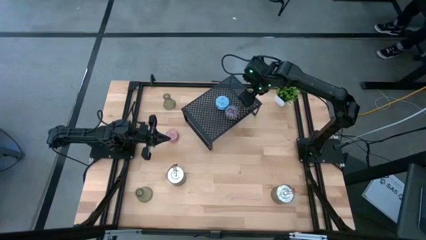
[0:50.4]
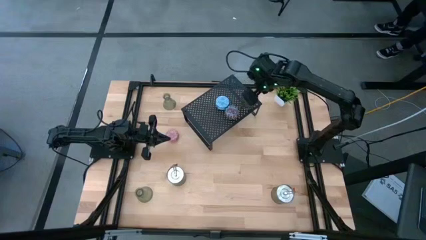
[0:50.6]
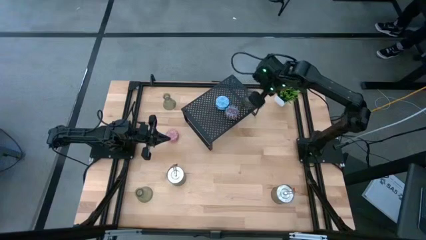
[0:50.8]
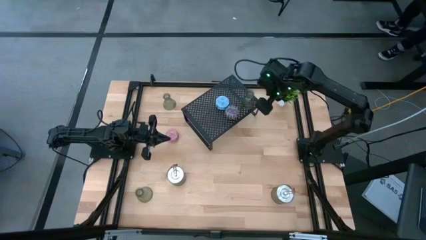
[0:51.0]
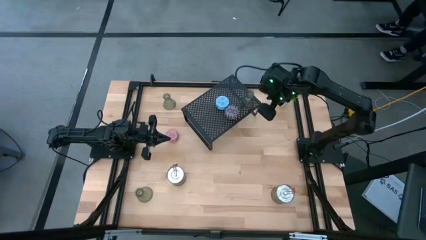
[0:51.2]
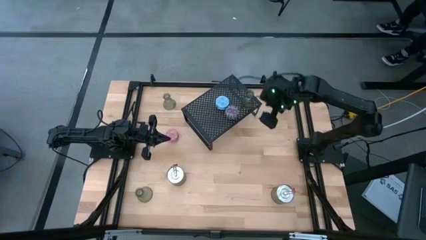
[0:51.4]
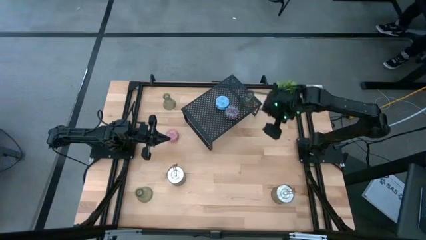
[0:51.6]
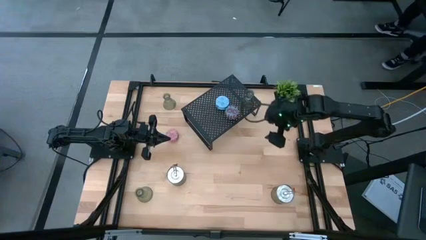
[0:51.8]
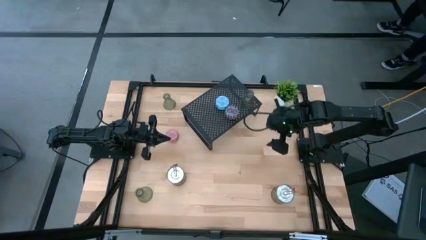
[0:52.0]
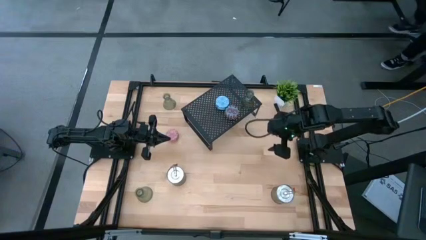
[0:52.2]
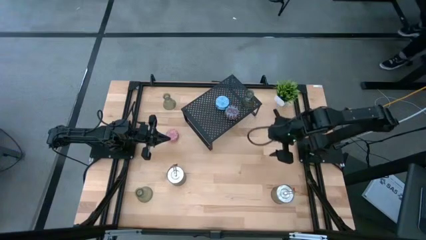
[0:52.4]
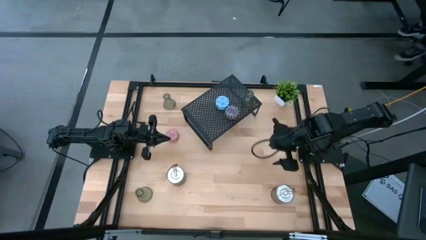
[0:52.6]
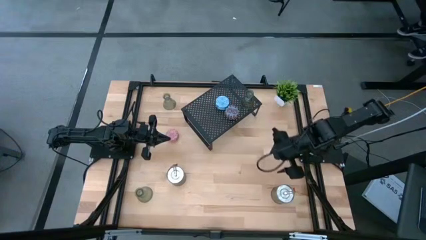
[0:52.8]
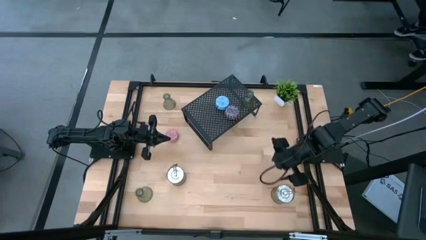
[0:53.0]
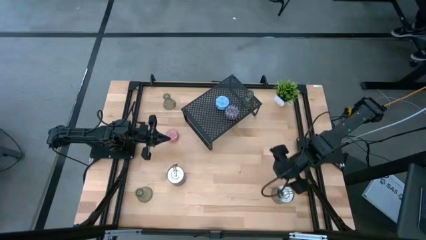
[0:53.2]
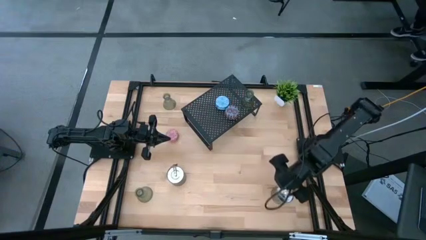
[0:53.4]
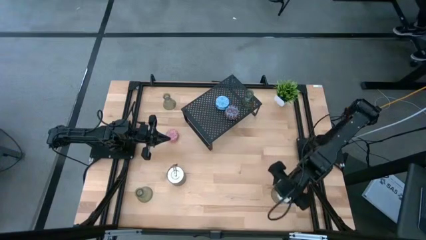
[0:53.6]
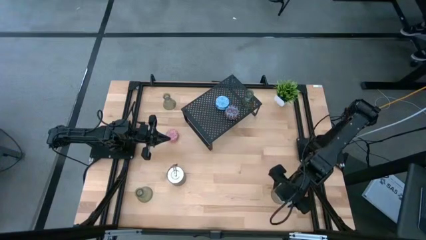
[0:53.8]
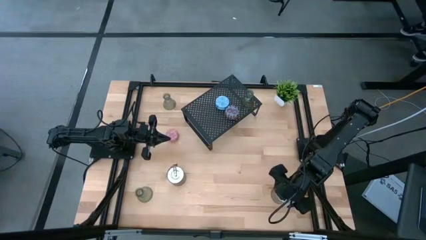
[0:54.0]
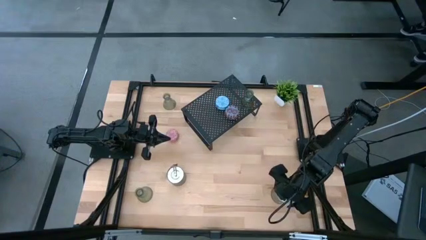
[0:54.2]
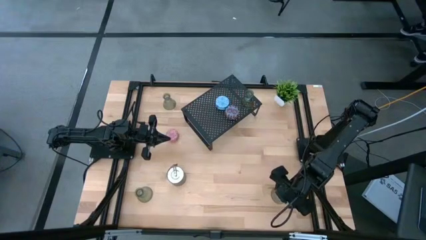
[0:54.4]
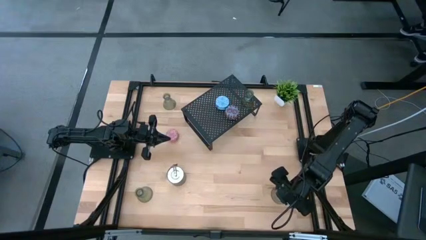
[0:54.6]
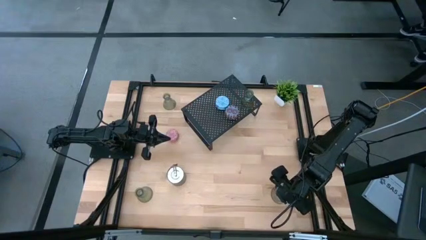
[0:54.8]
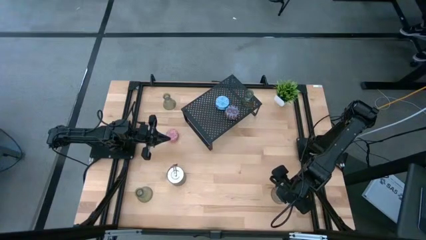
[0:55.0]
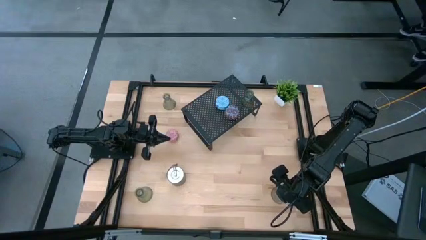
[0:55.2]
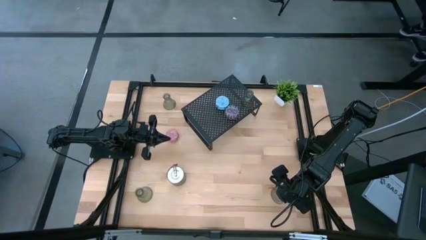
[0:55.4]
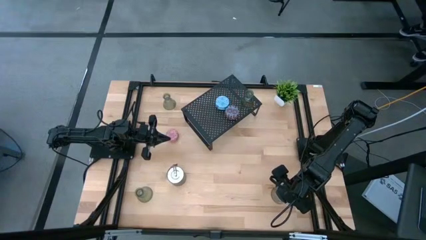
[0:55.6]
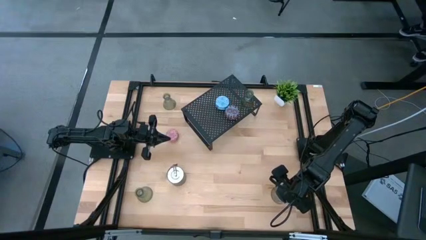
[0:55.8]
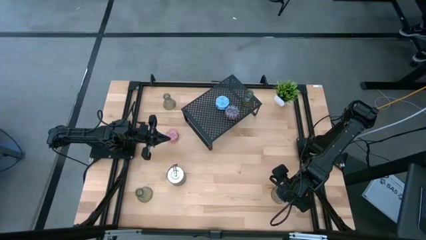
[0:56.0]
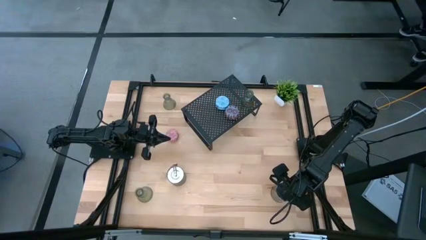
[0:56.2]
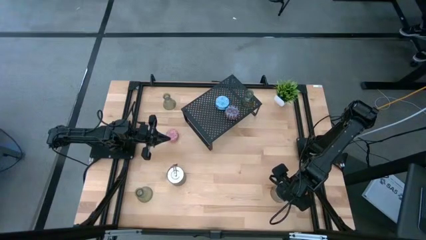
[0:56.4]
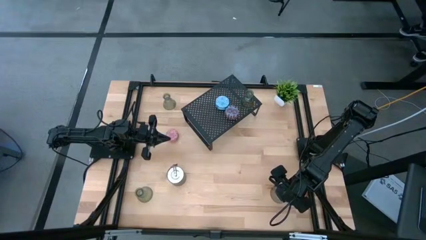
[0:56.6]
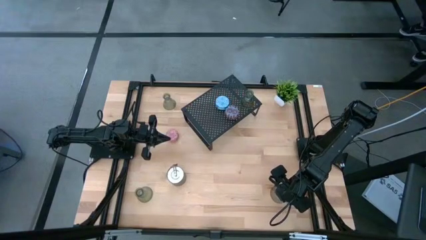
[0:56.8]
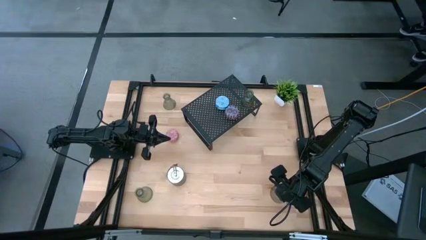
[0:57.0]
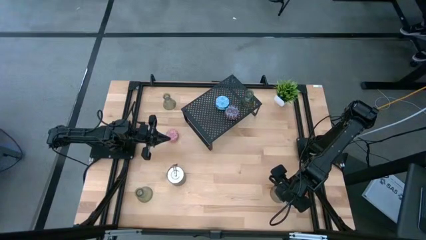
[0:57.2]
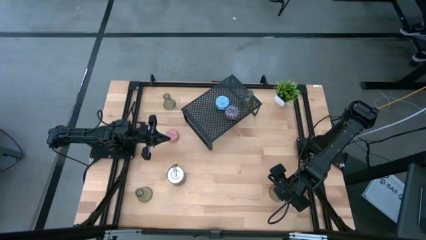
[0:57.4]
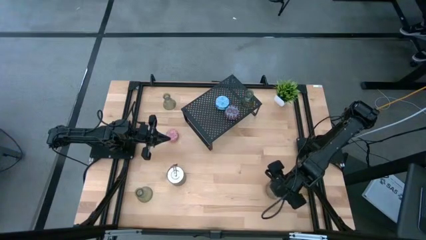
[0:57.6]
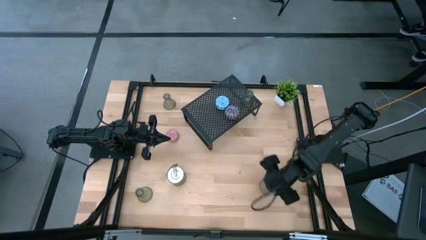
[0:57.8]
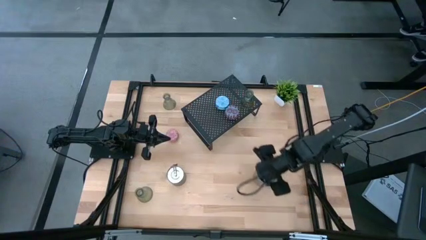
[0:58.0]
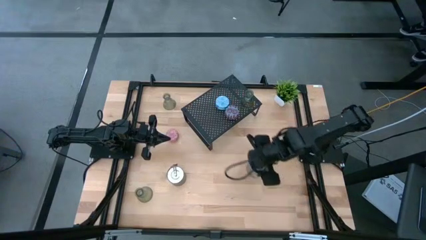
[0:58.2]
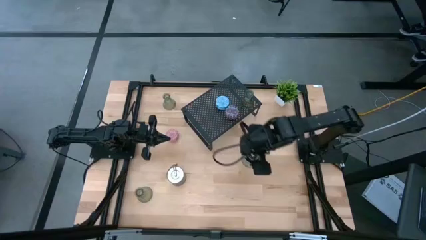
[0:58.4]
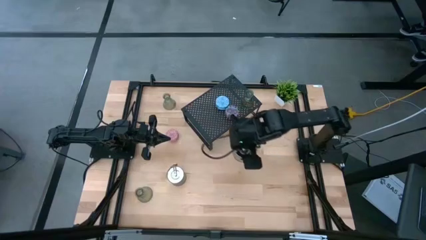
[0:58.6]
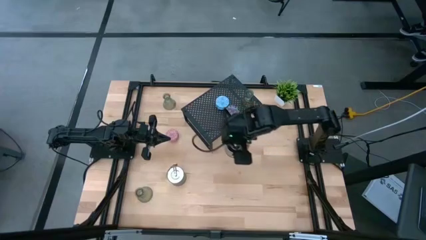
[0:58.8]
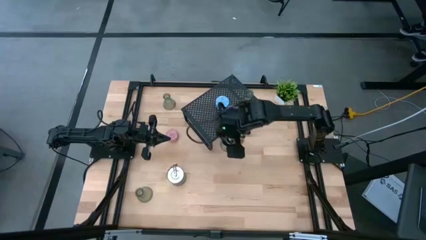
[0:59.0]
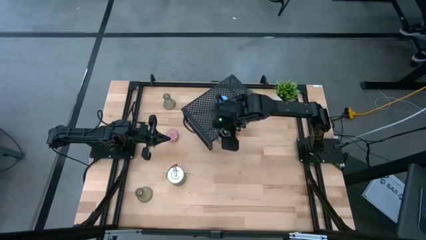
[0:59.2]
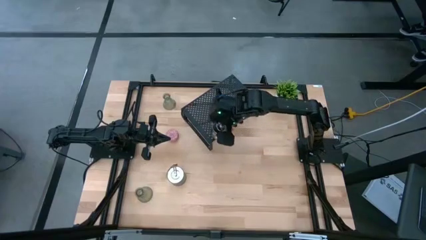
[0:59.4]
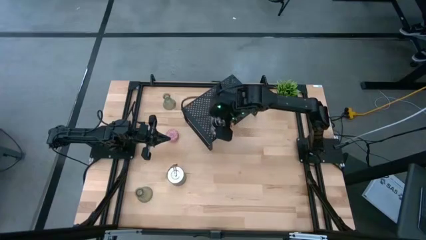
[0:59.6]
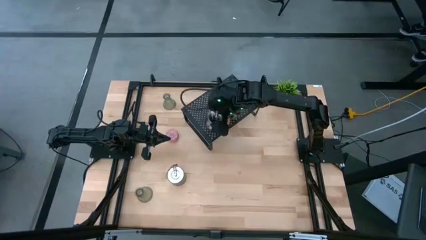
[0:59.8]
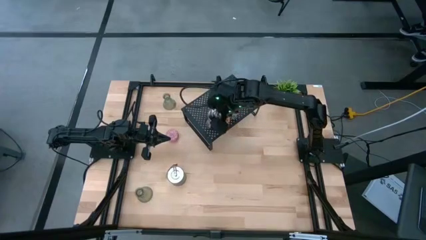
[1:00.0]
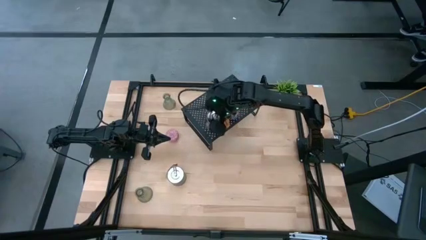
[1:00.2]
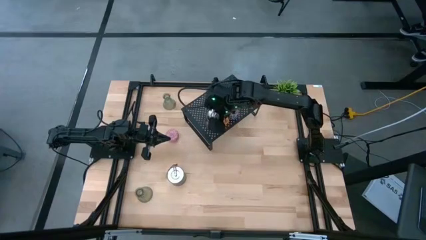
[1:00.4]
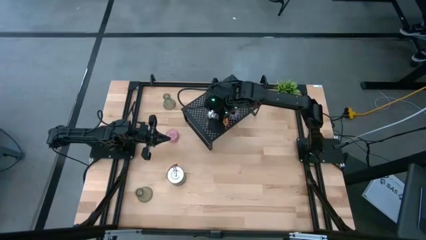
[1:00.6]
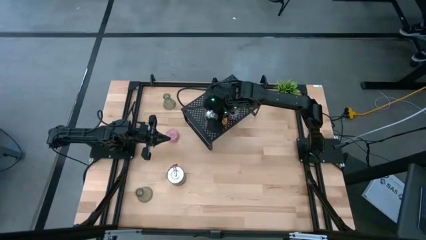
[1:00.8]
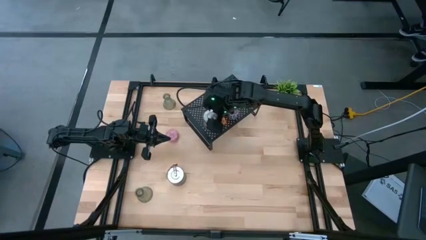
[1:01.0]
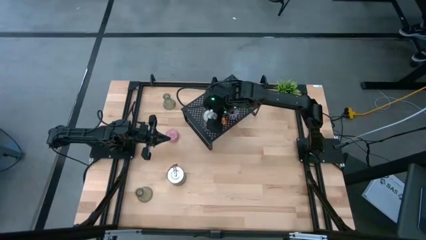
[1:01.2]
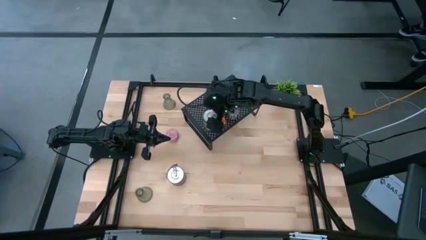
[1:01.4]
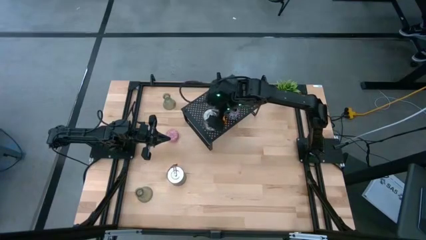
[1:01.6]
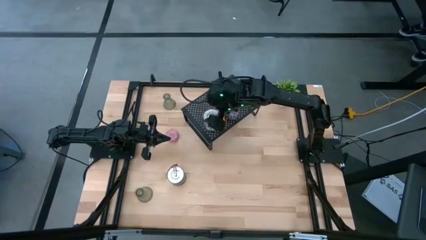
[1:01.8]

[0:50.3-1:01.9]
Task: Pick & Place candle stick holders
Put the brown large scented candle on the shelf
